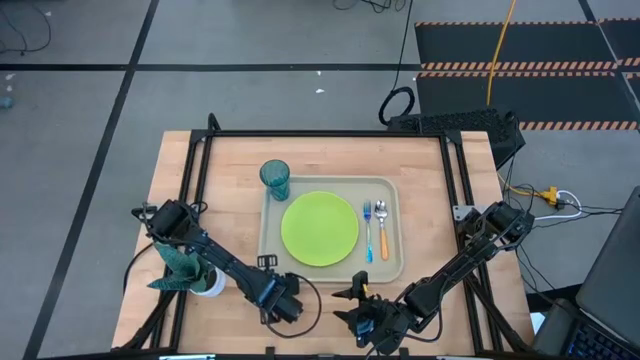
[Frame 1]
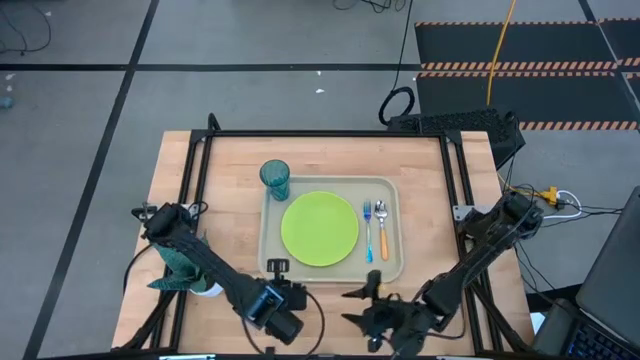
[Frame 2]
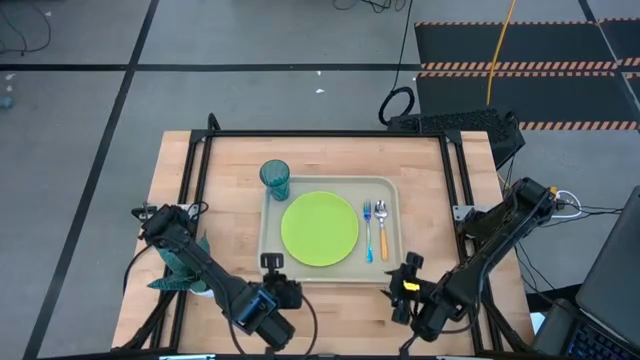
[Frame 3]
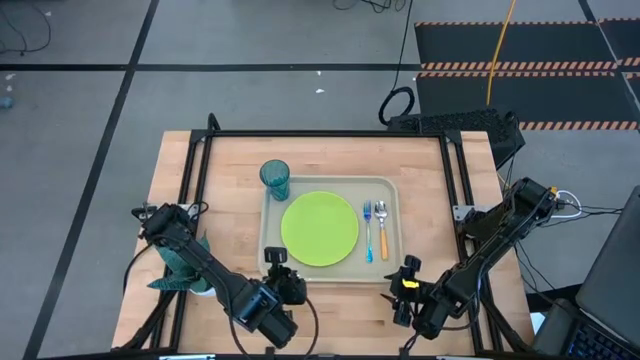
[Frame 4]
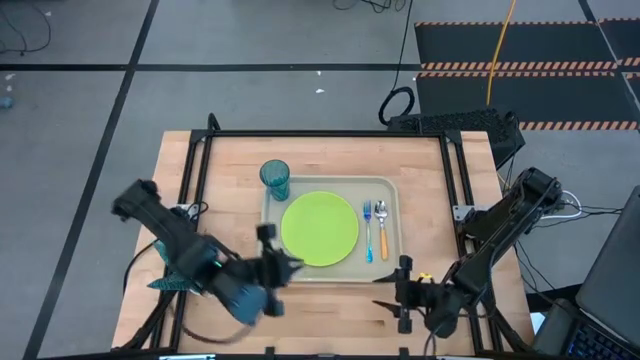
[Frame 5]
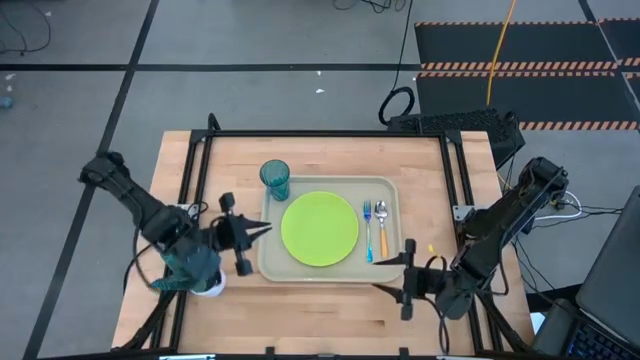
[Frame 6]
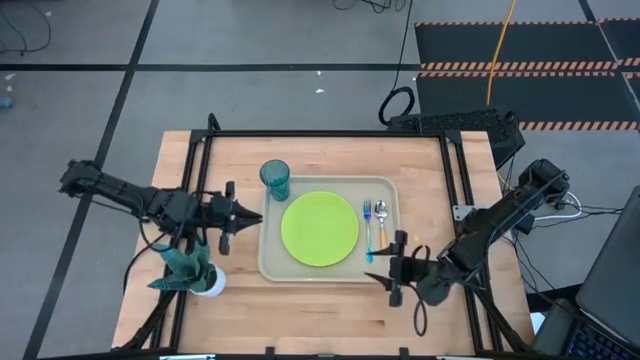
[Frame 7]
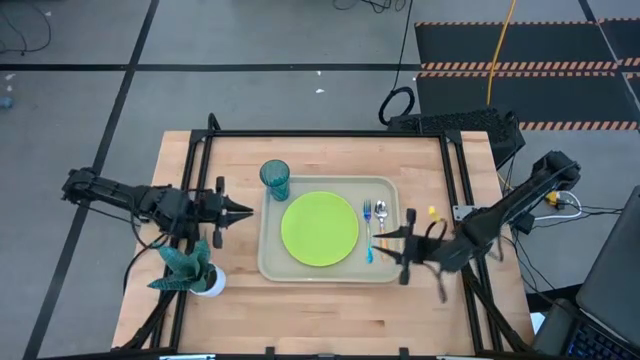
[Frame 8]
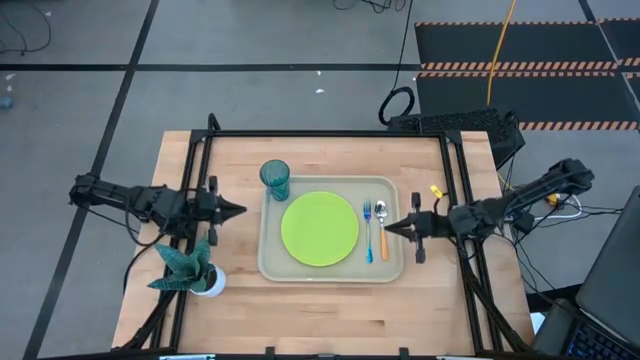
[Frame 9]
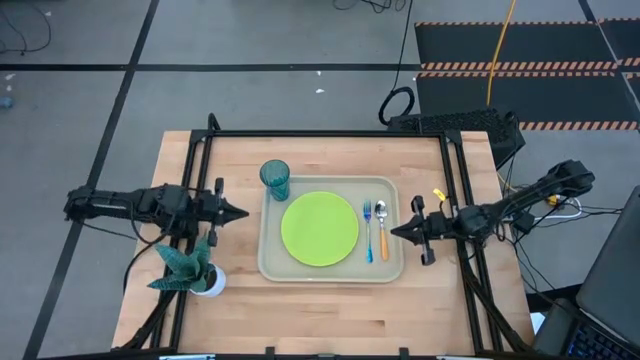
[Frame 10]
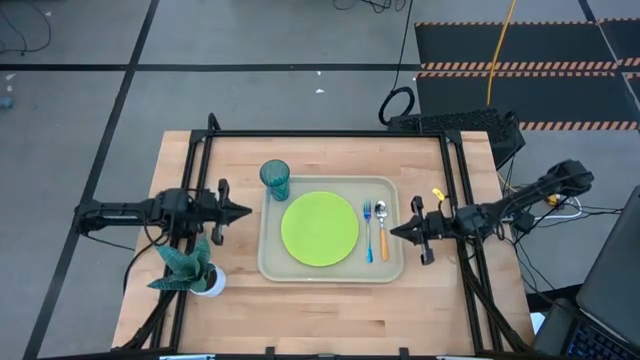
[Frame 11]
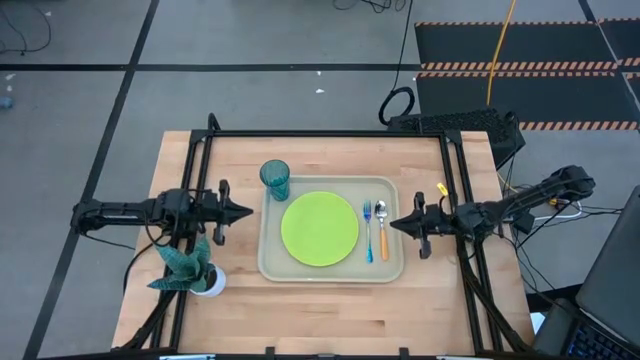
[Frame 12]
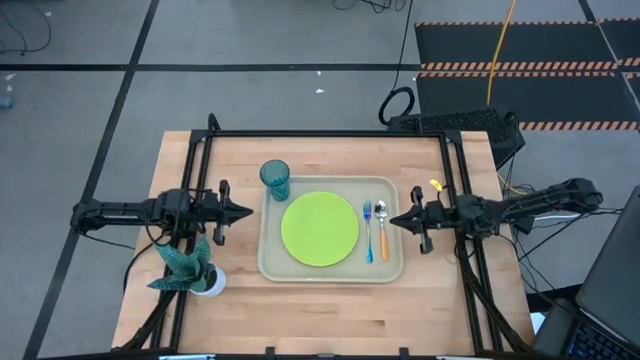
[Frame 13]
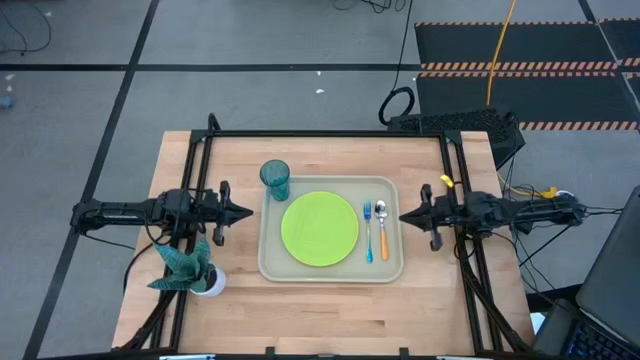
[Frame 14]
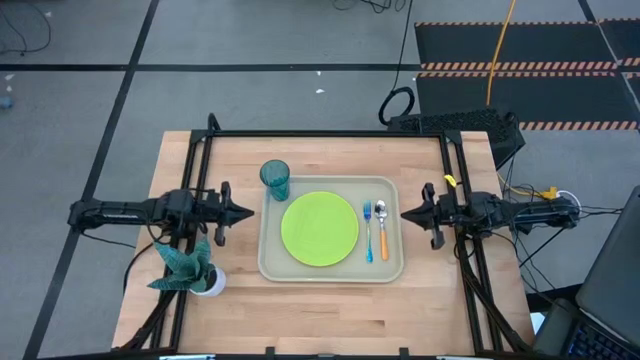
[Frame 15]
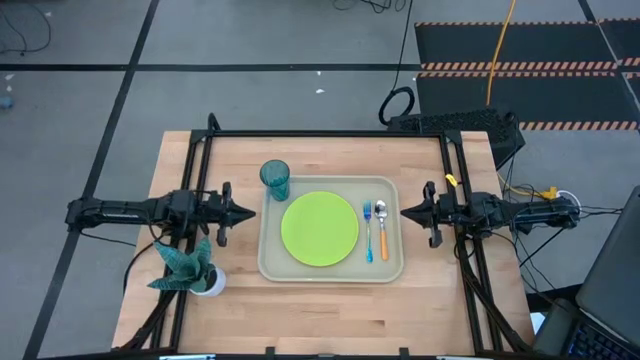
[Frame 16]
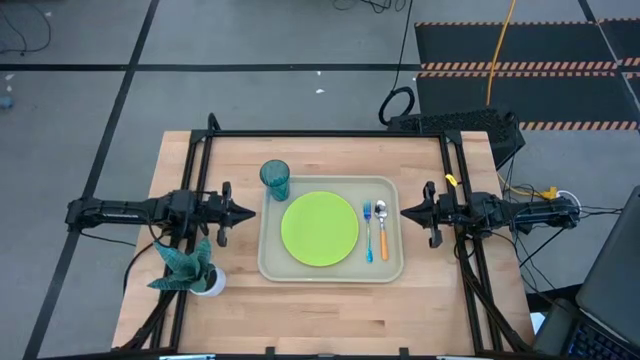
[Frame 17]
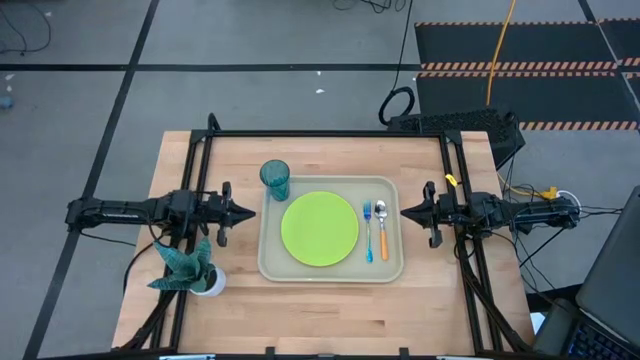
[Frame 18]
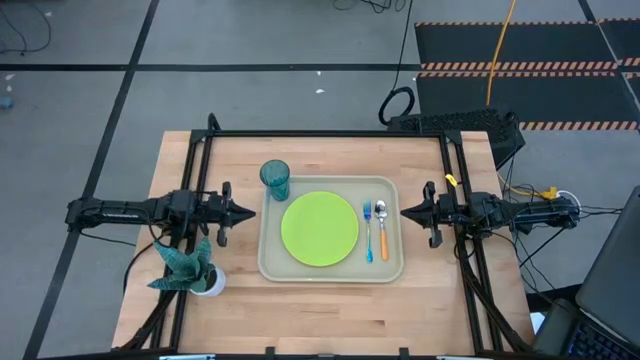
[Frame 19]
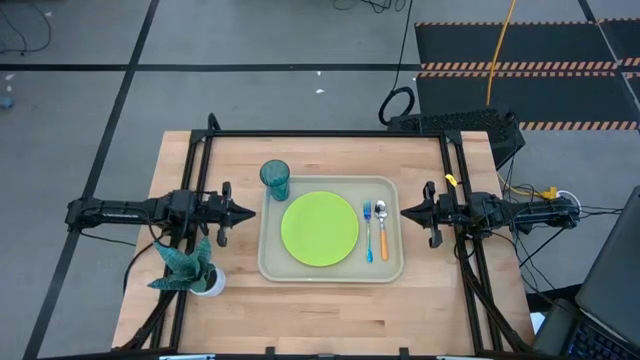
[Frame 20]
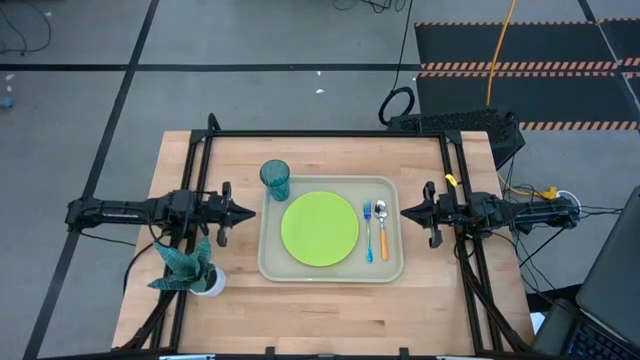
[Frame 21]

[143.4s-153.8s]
Task: Pick and place plate/cup/fork/spoon on tray
Return to Home Position

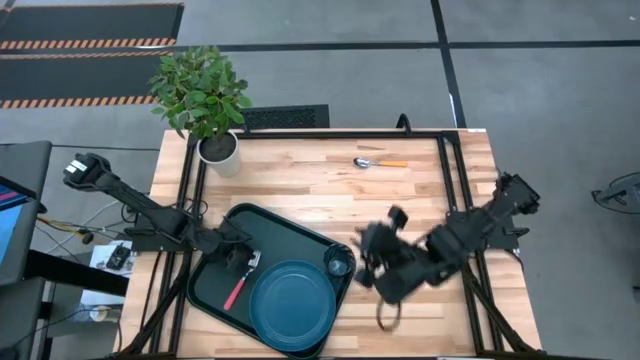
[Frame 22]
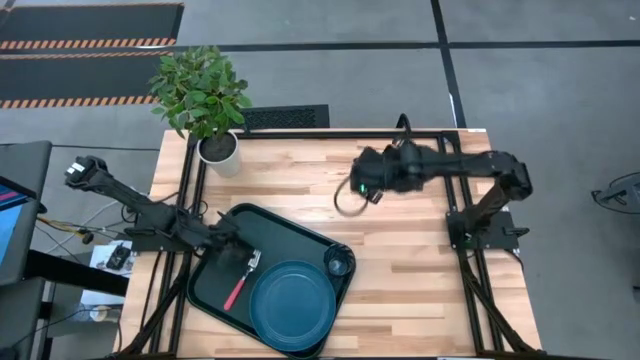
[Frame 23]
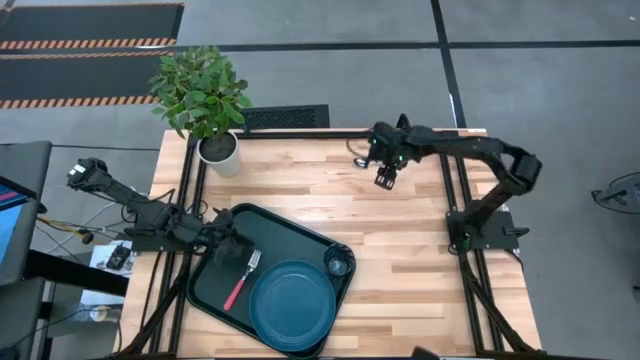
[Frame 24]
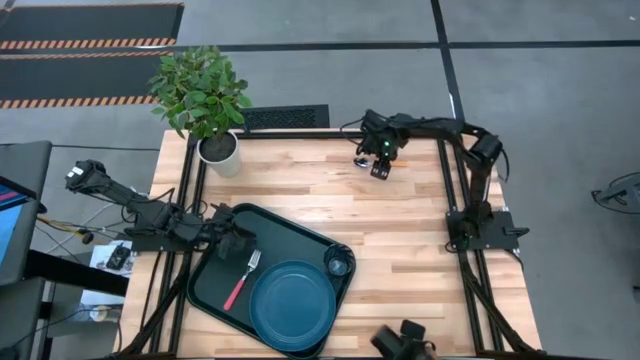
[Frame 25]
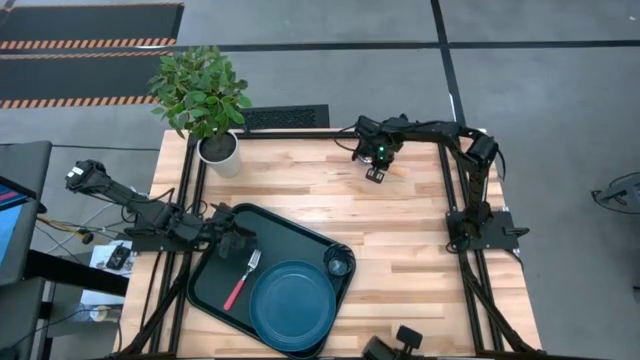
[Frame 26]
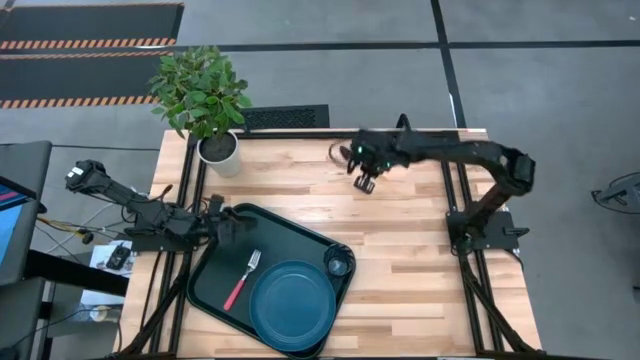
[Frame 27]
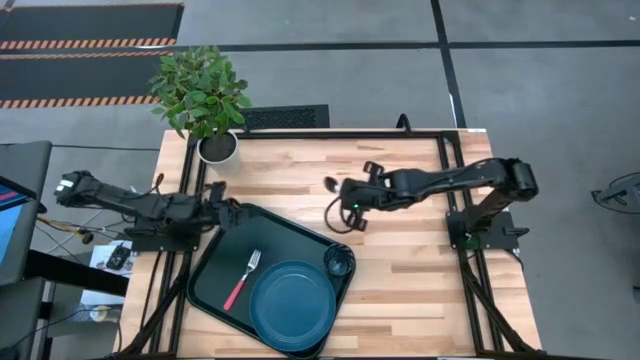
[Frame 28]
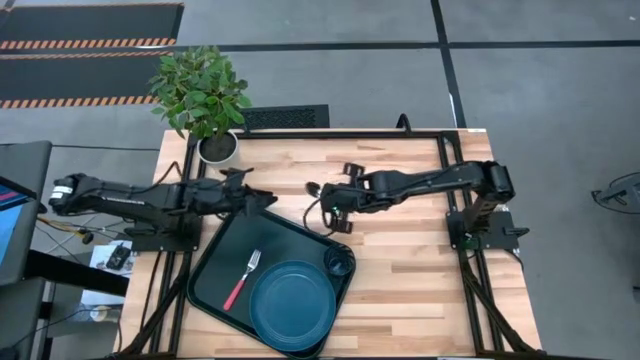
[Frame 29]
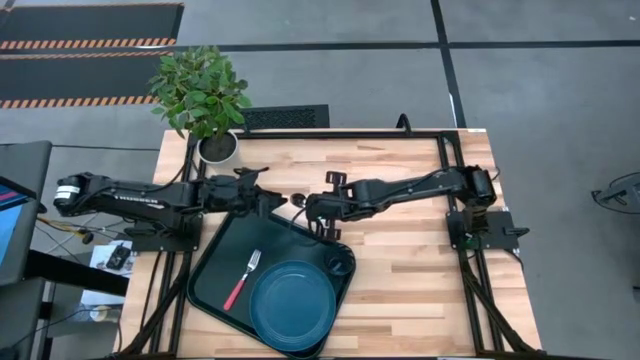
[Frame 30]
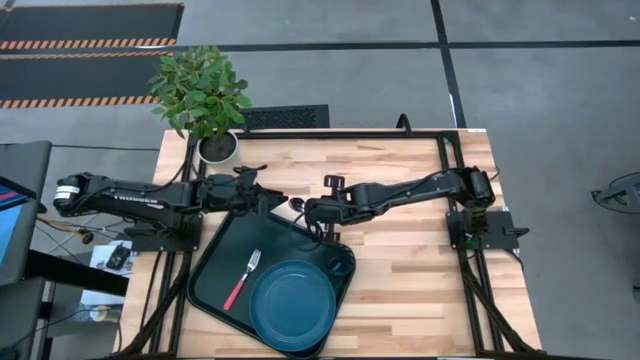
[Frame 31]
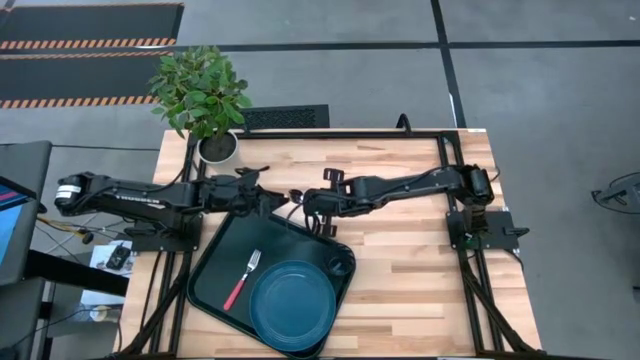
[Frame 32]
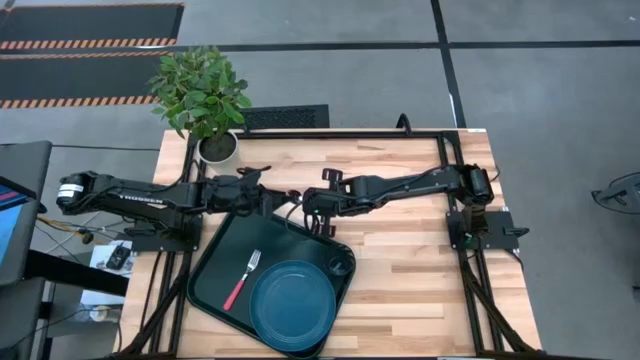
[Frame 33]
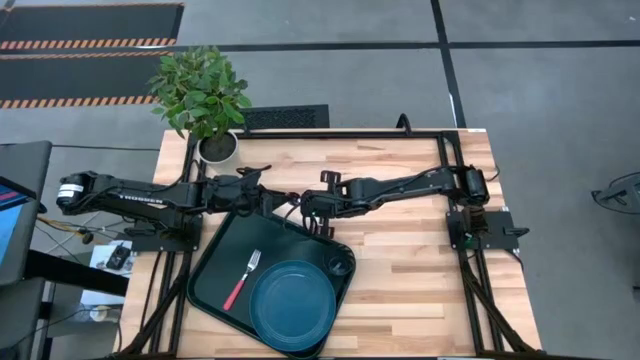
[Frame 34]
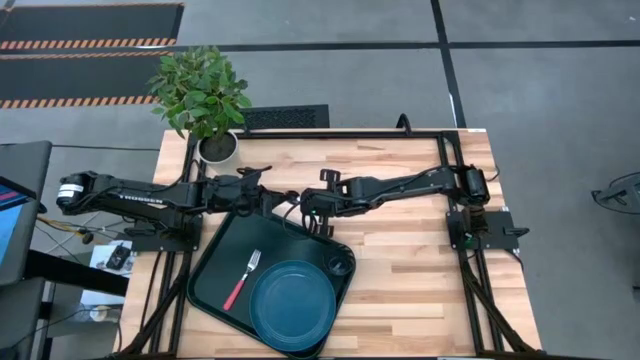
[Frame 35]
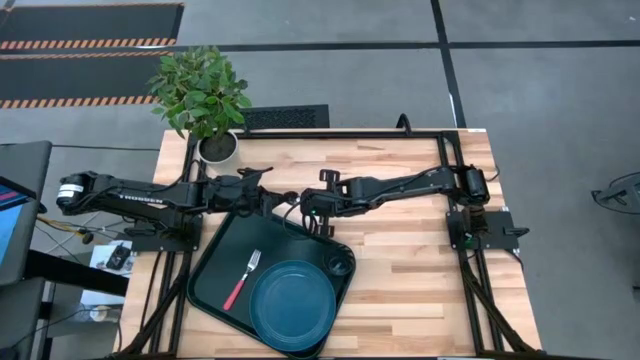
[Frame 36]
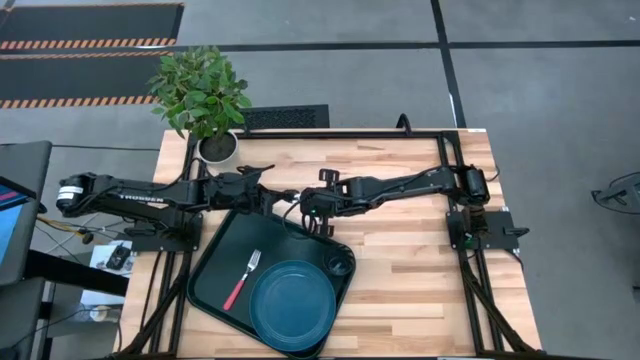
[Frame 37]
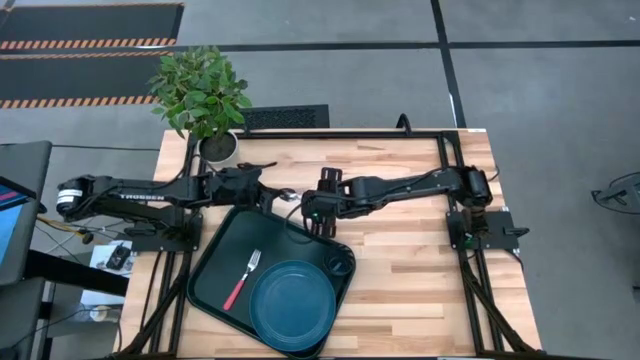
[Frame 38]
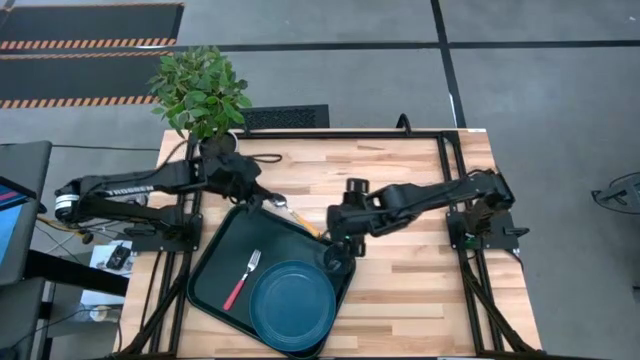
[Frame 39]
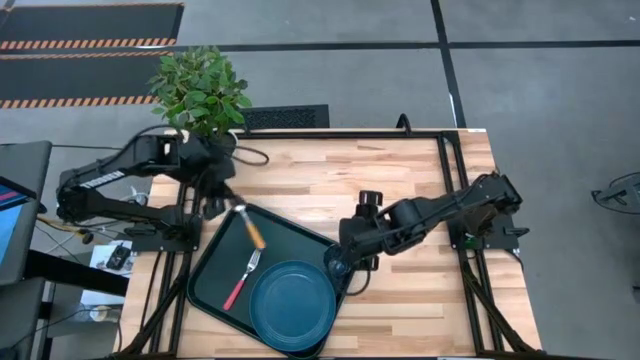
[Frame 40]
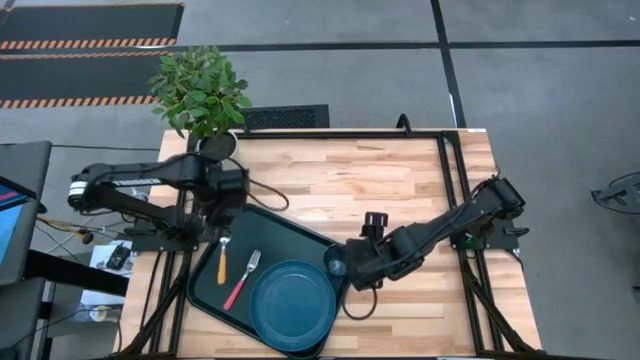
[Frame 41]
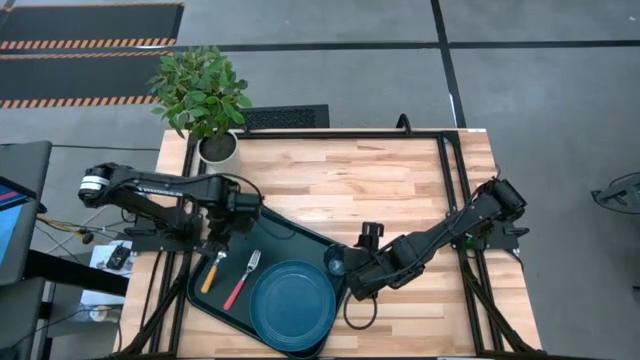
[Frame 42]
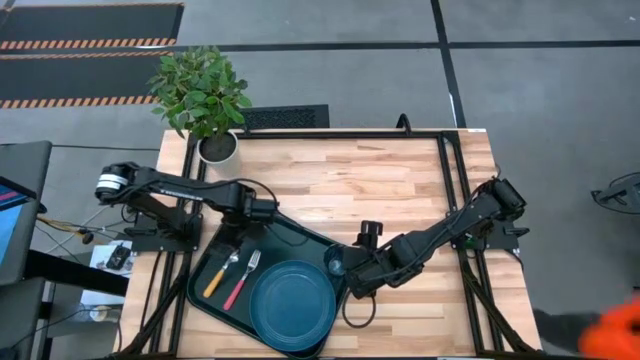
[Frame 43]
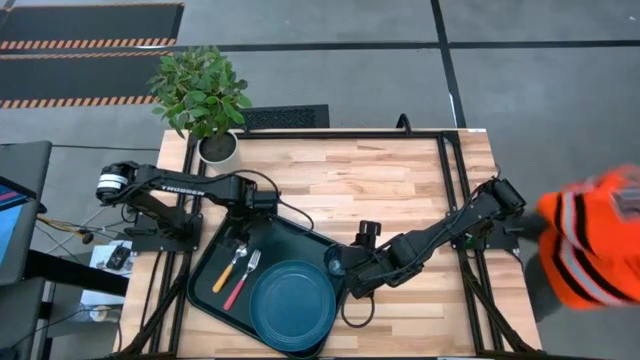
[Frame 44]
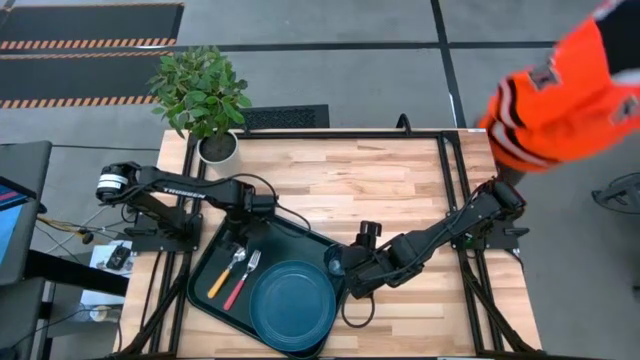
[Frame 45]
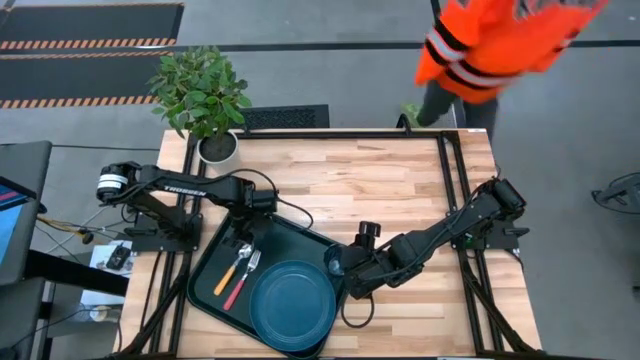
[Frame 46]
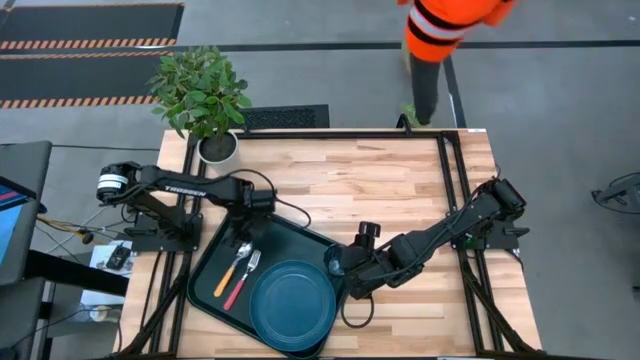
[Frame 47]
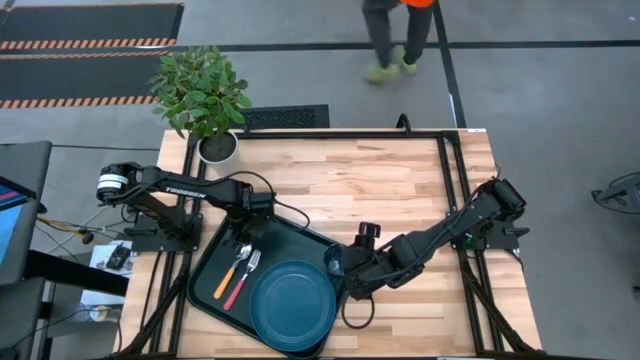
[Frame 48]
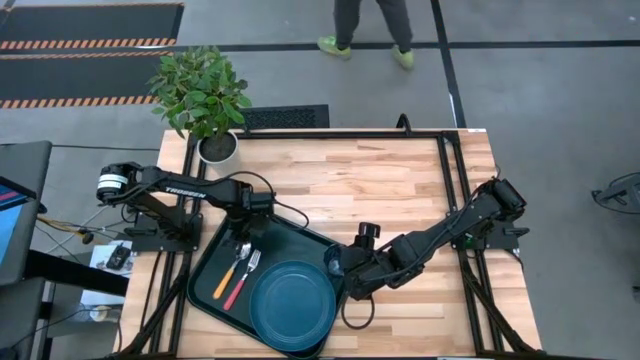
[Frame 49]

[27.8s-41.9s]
Task: Pick and place plate/cup/fork/spoon on tray
Put the yellow spoon on the black serving tray to the left of the pink fork
